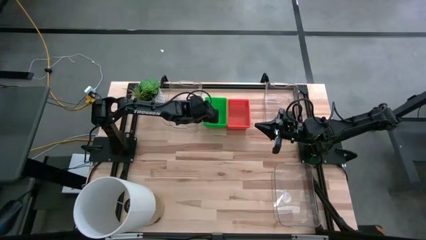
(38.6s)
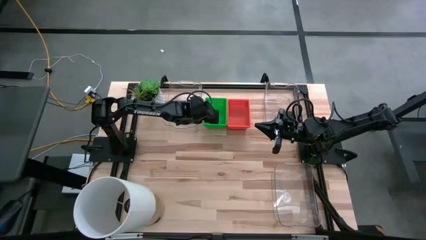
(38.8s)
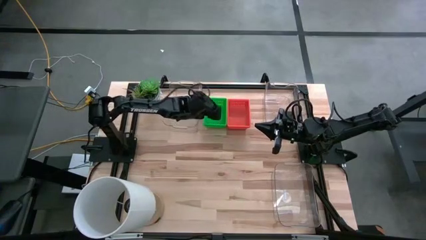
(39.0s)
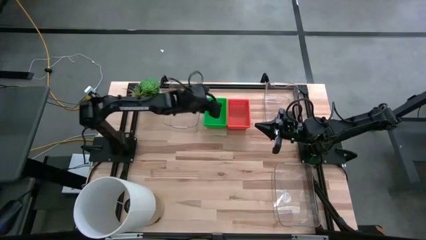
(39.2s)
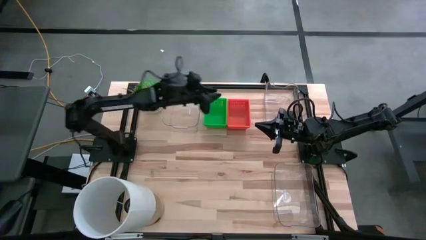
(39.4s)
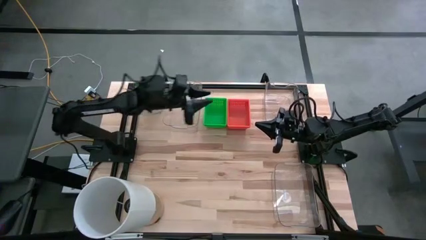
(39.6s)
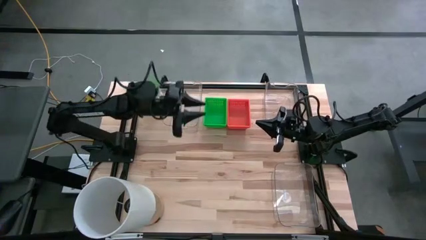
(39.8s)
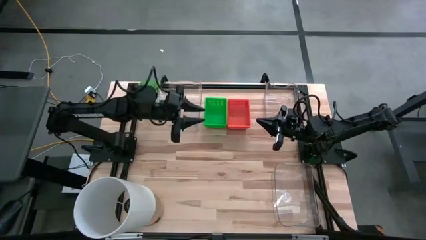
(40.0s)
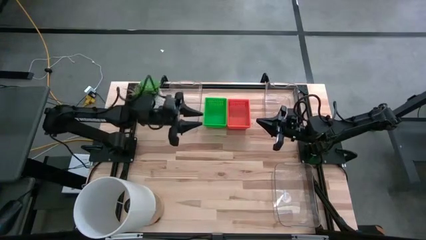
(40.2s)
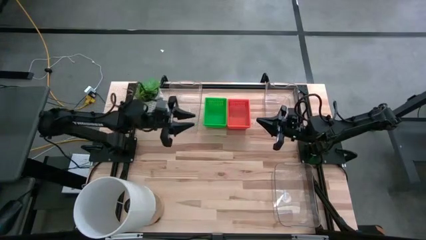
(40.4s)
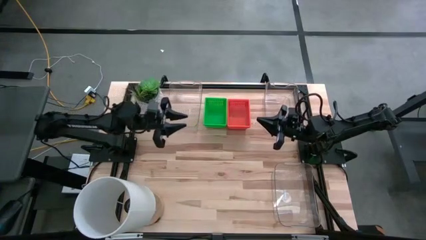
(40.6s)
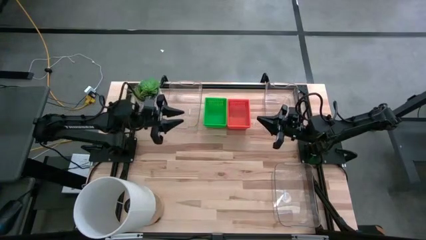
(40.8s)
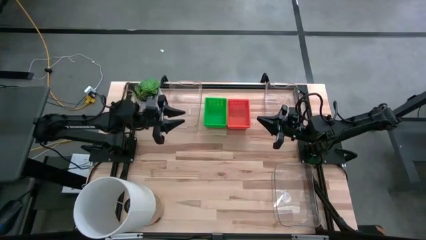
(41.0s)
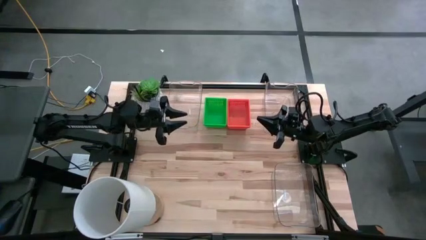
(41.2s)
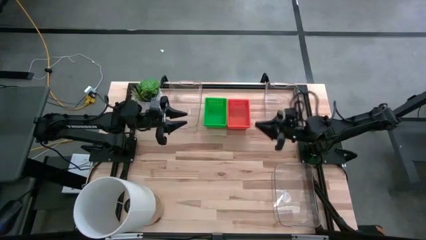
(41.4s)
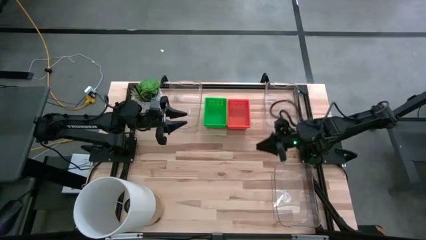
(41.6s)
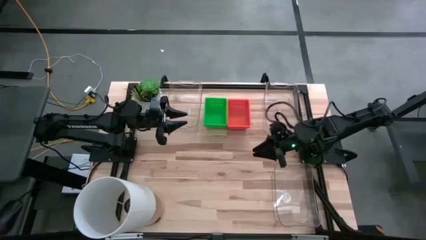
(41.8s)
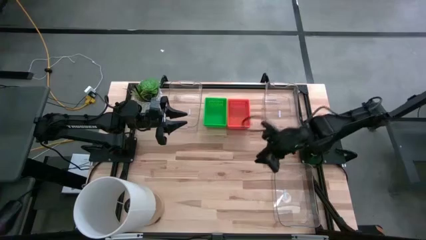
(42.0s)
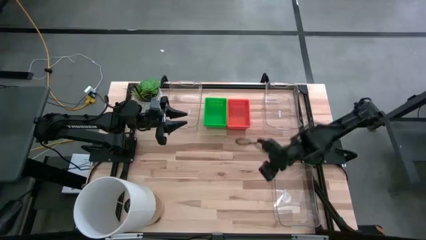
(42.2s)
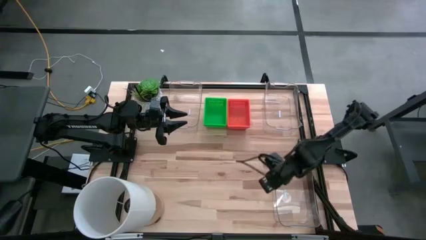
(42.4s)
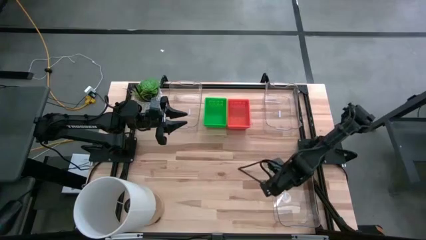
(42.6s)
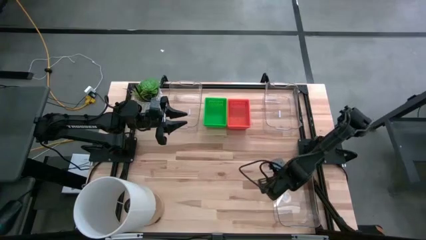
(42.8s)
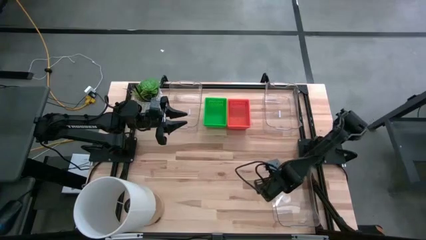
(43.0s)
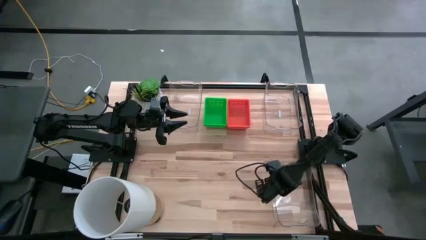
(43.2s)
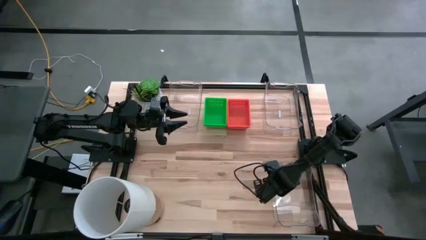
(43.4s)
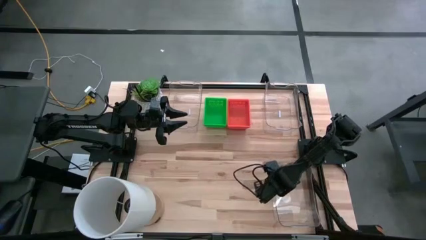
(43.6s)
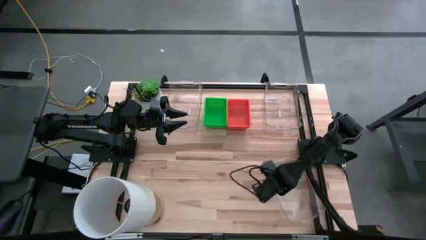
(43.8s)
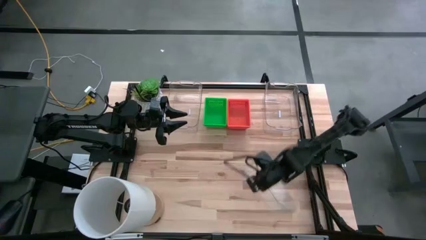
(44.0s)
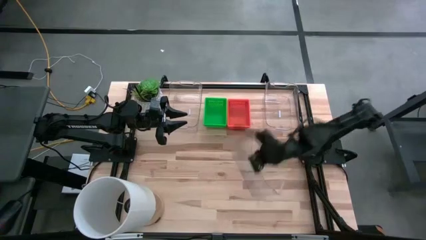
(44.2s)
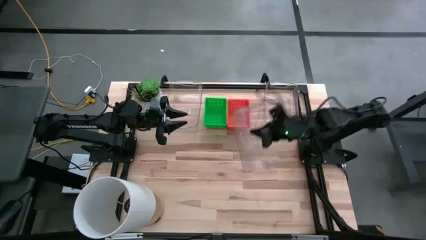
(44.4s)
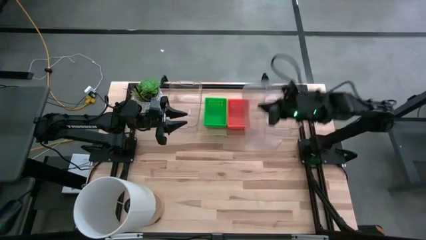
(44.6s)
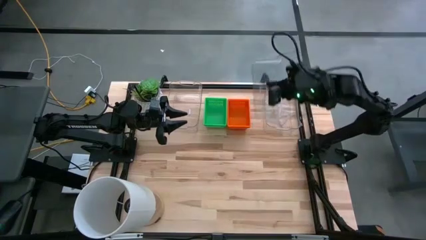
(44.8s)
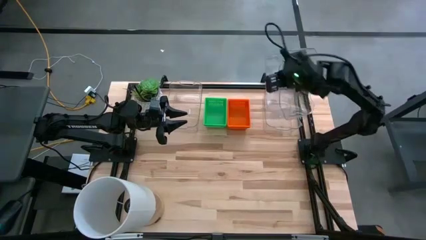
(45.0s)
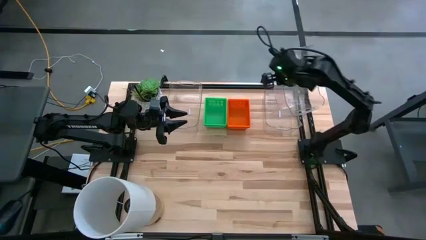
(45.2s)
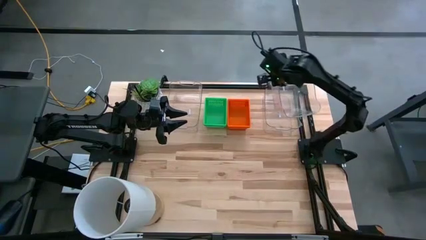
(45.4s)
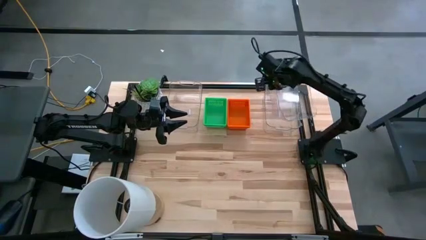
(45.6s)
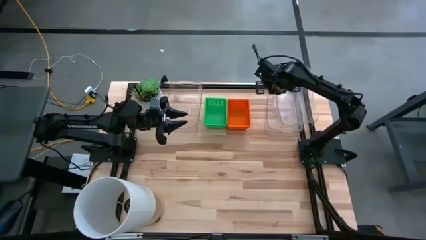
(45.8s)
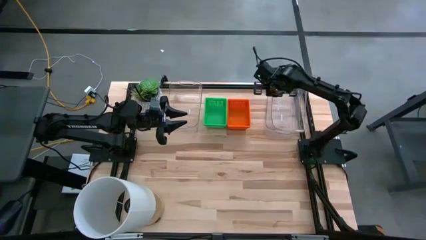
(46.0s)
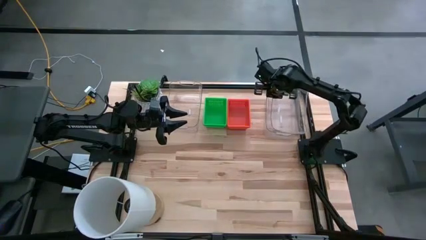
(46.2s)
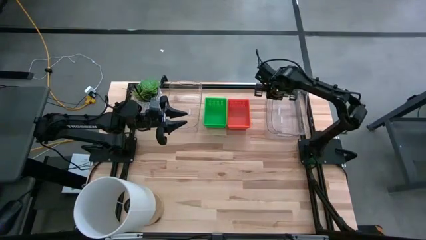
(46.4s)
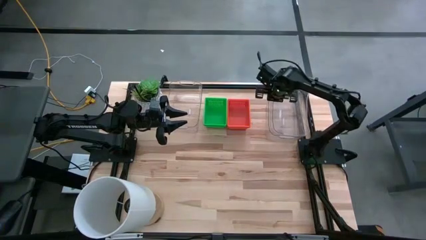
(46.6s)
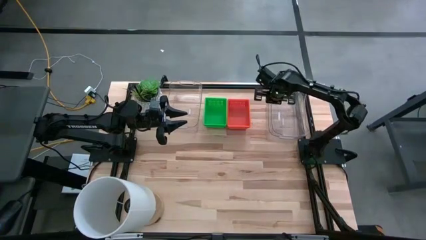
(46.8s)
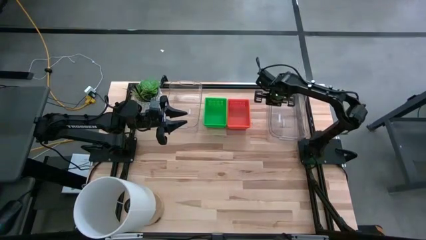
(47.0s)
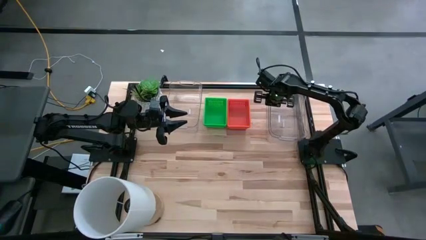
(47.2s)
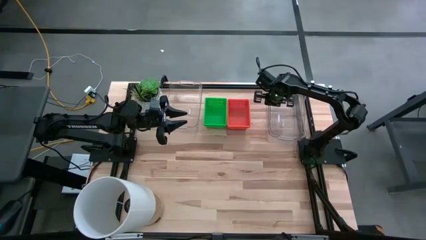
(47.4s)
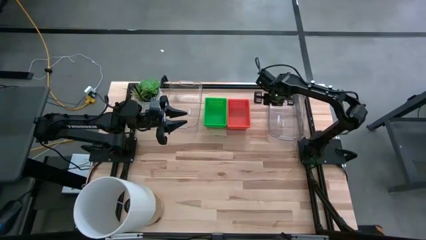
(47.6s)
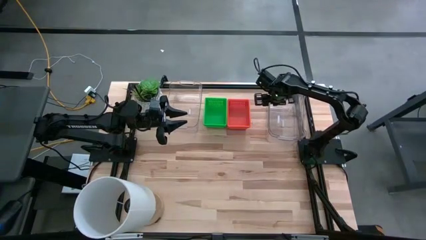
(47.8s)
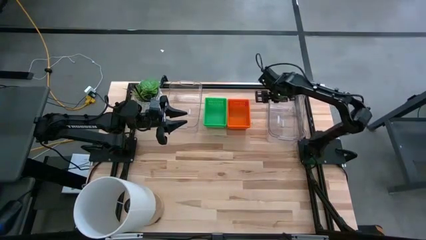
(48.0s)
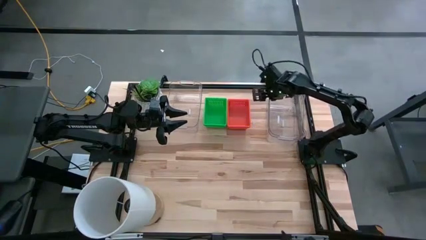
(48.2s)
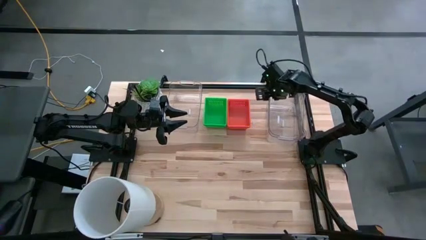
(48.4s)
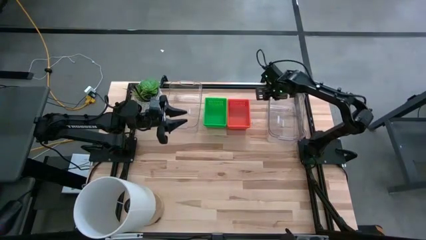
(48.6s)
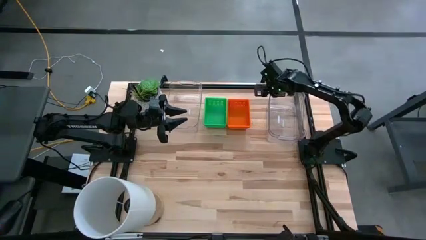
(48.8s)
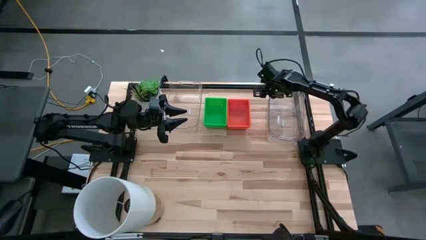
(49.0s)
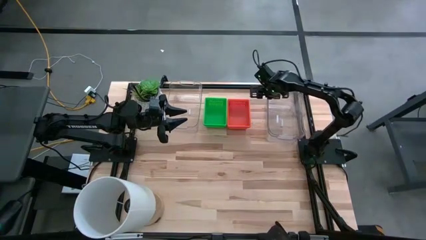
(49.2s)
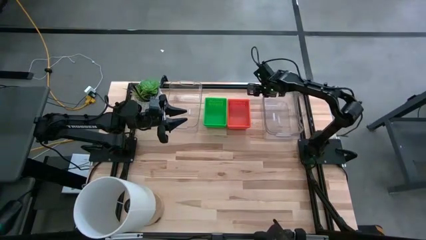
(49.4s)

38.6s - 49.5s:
Stack the bottom transparent bin on the top right transparent bin
